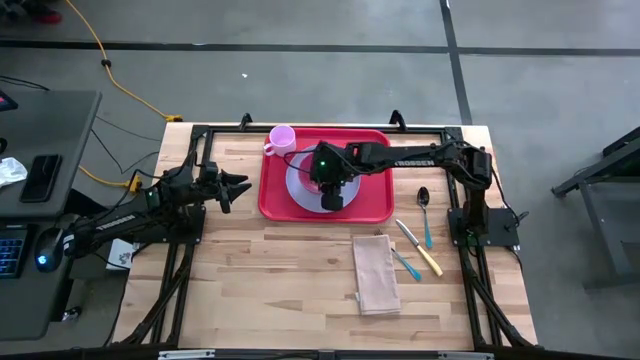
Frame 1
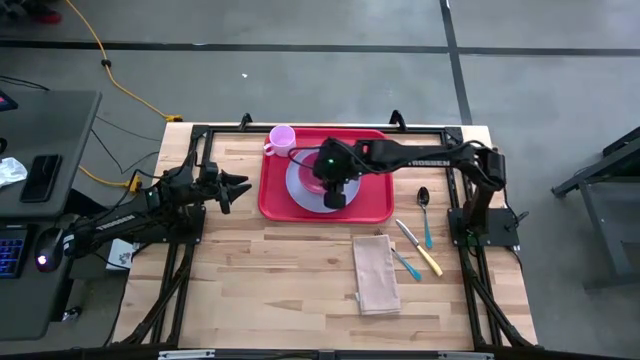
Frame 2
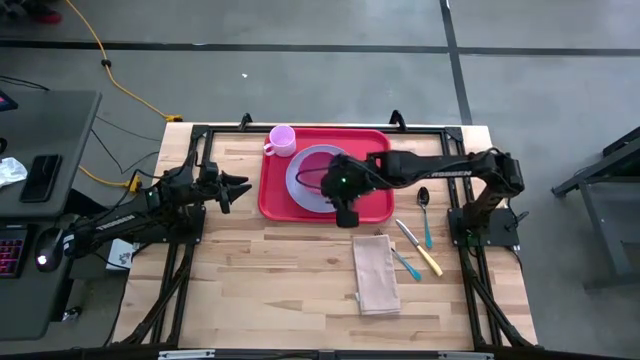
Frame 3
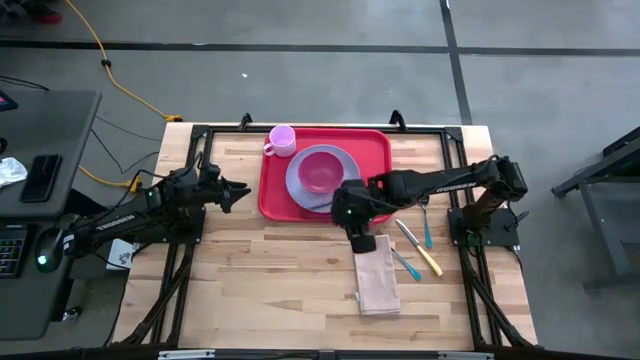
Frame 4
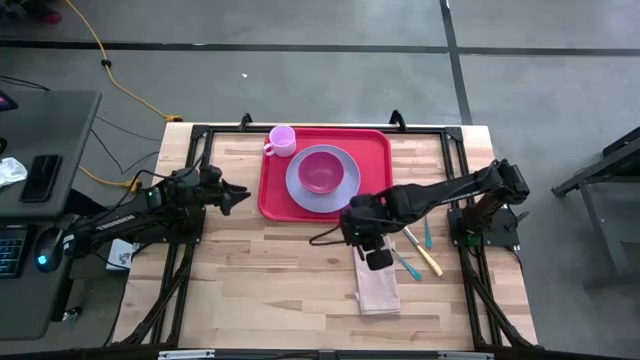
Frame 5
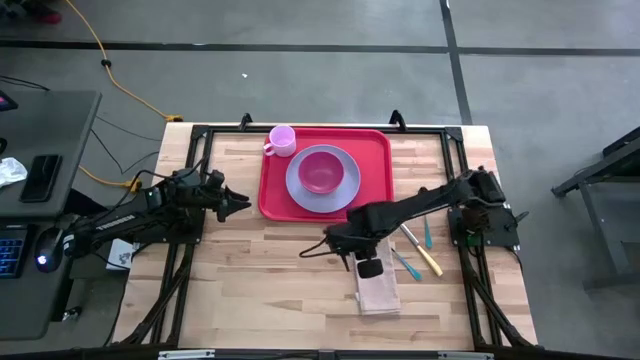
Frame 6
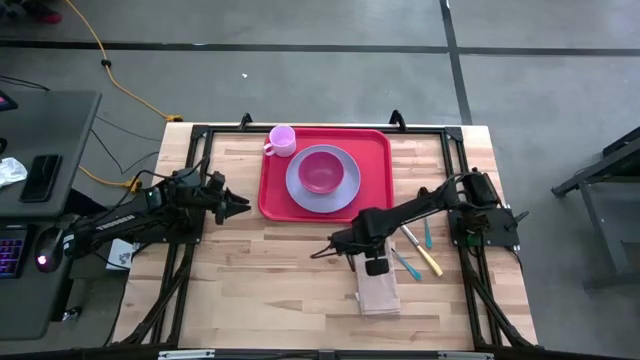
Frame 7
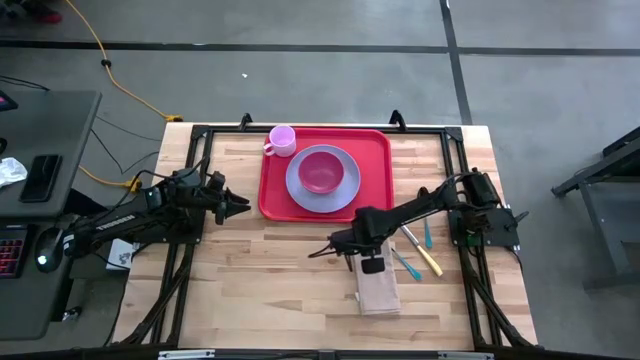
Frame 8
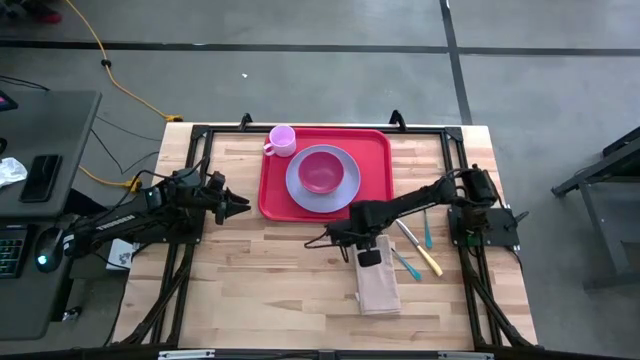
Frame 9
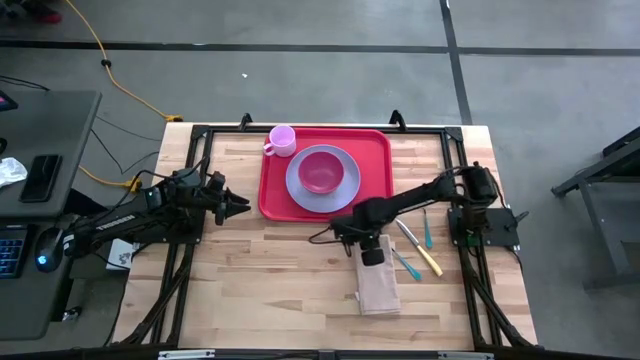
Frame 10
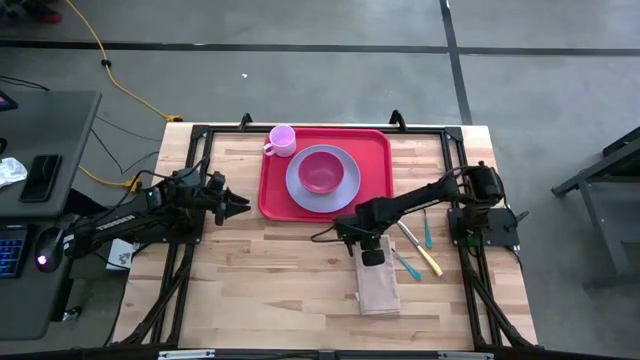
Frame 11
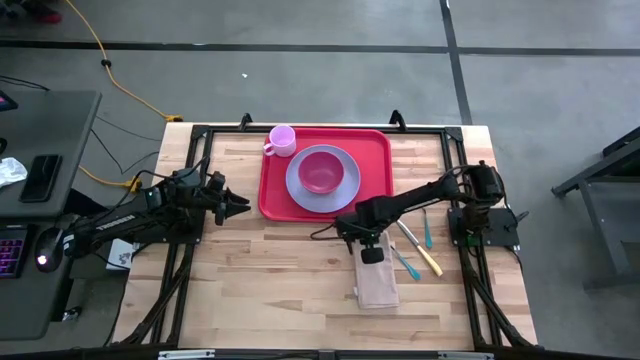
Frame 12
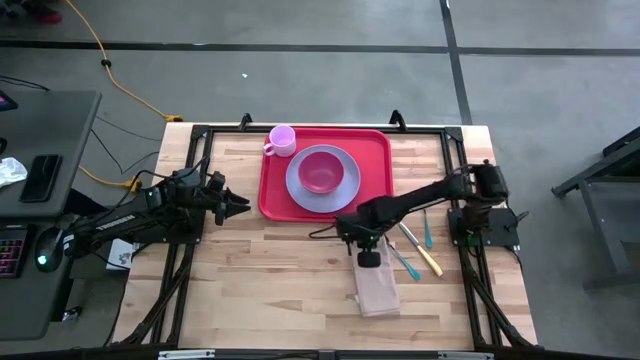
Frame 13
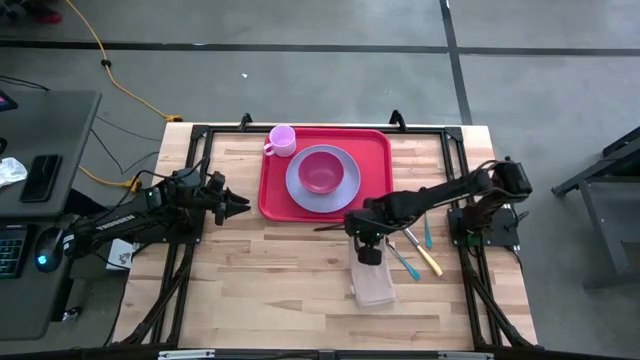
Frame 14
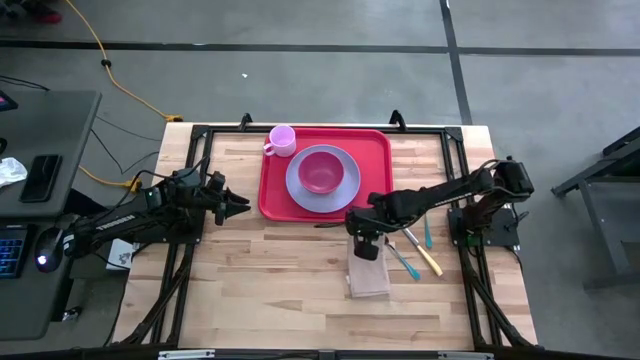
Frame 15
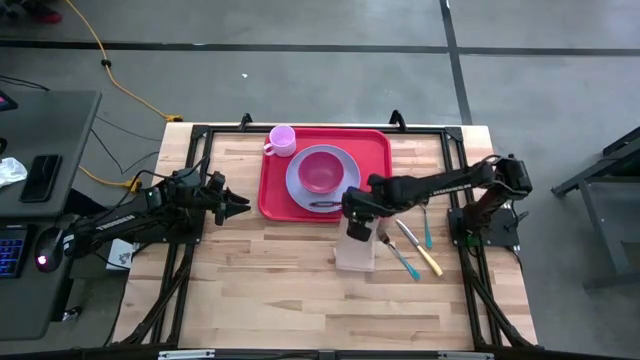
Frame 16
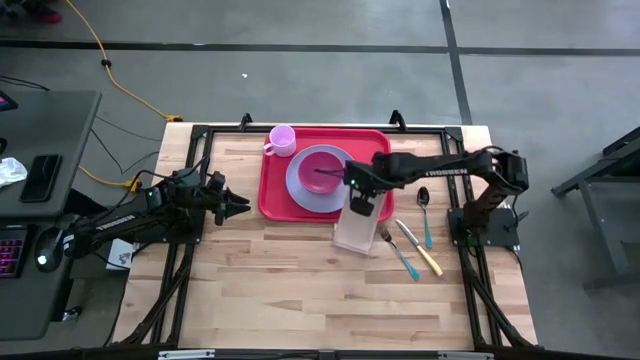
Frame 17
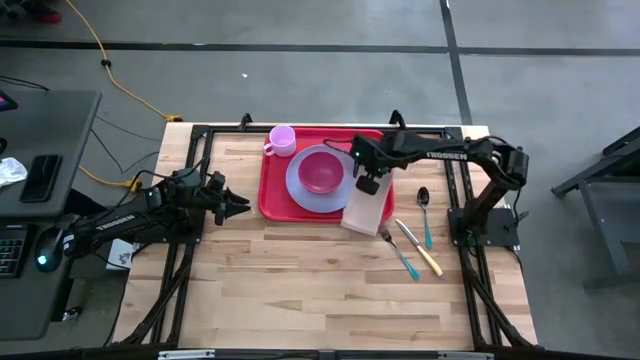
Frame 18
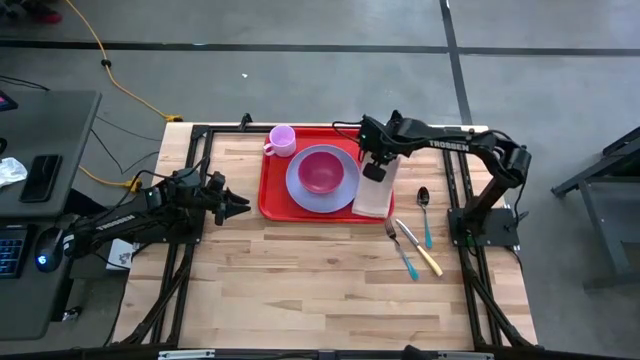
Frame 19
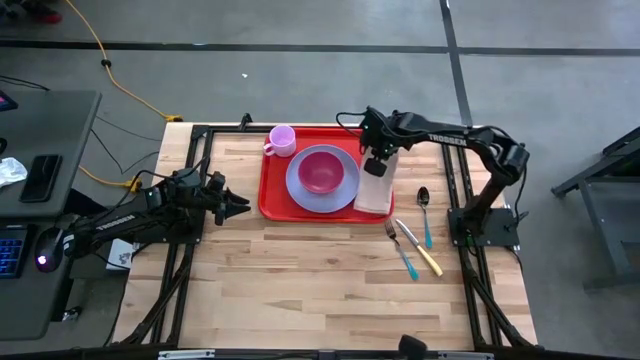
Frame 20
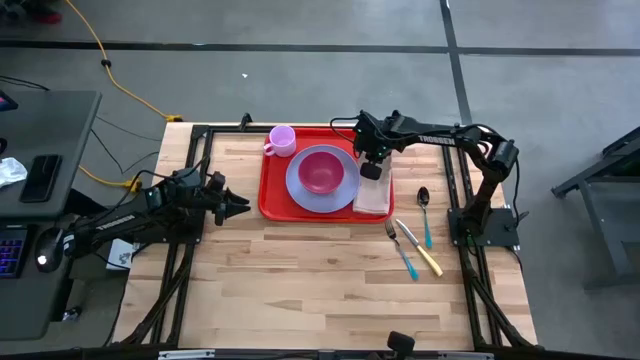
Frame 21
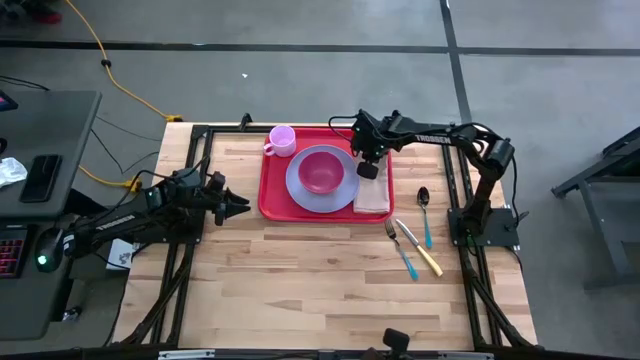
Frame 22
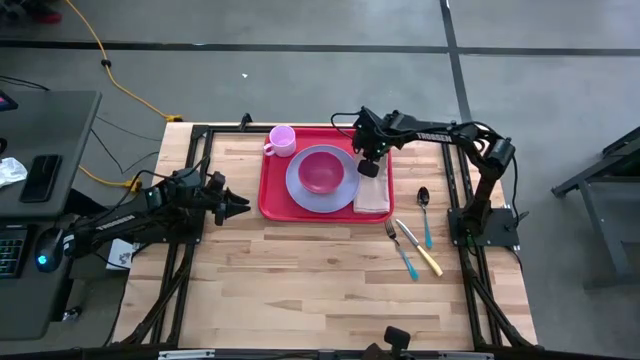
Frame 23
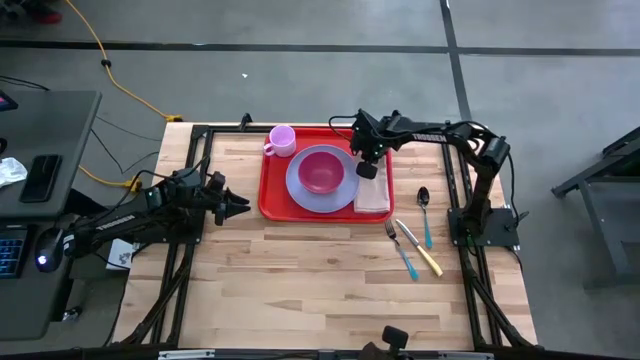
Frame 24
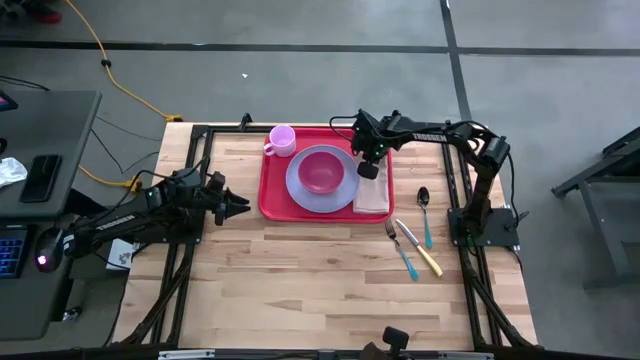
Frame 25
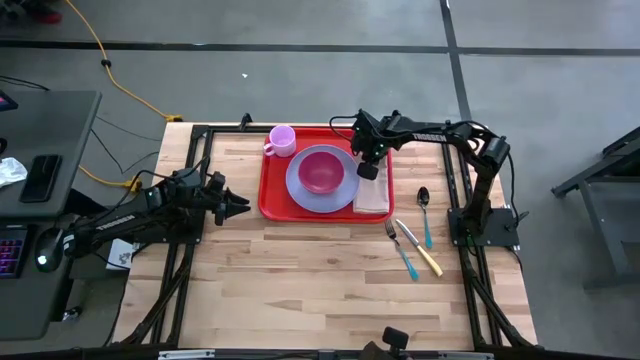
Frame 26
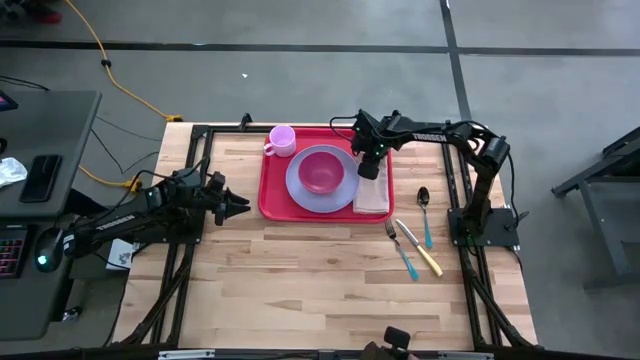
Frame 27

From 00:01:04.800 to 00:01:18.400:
Task: Set up tray
Put the napkin on the tray

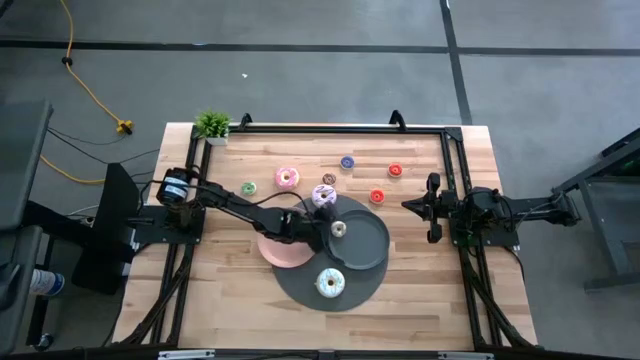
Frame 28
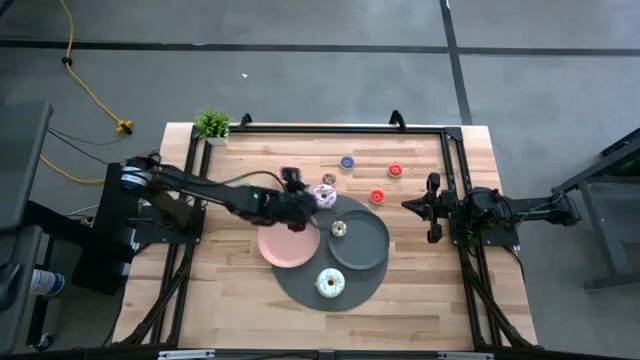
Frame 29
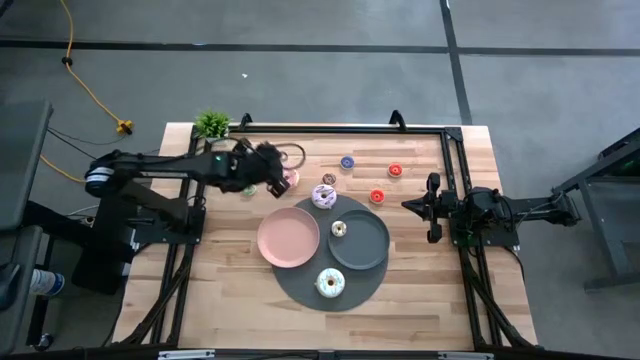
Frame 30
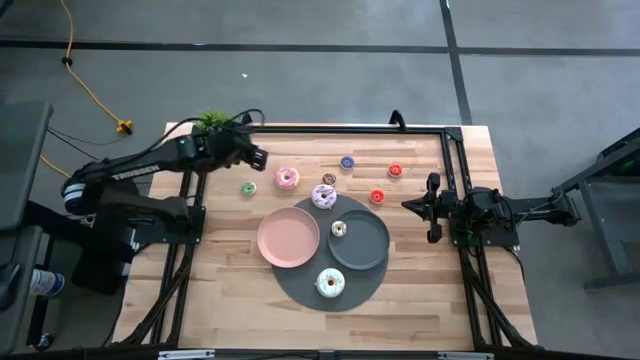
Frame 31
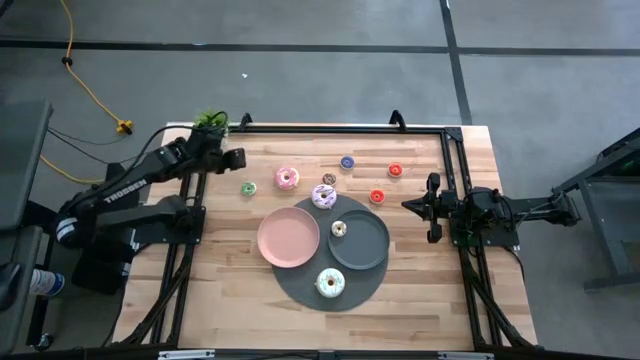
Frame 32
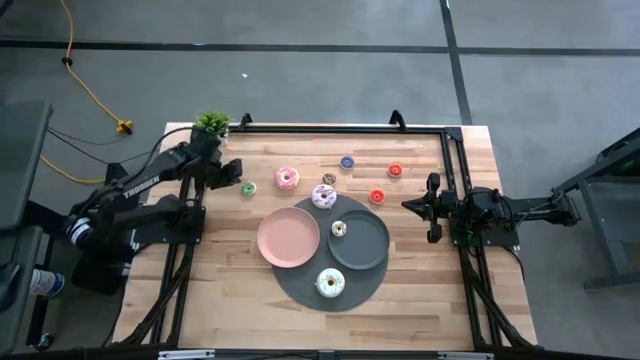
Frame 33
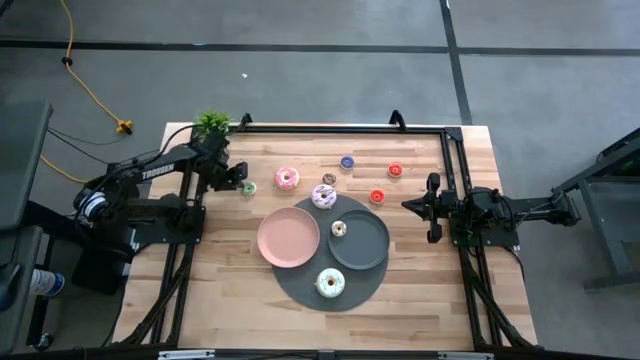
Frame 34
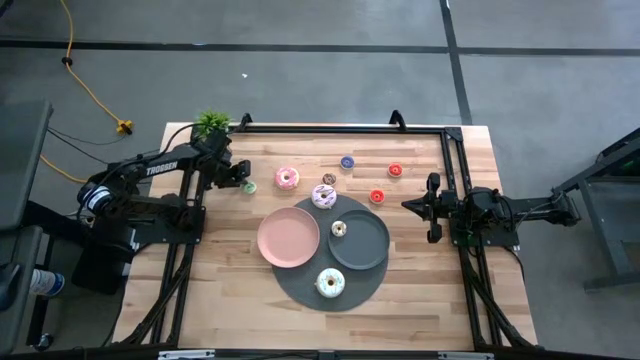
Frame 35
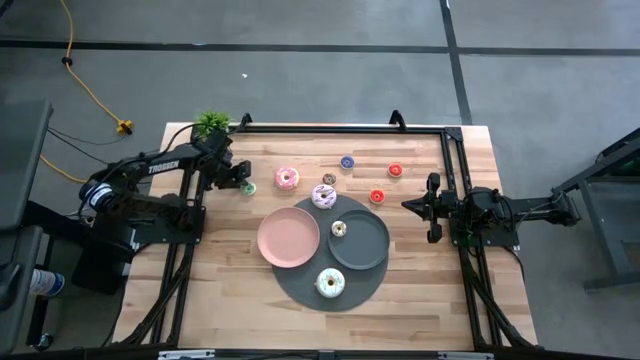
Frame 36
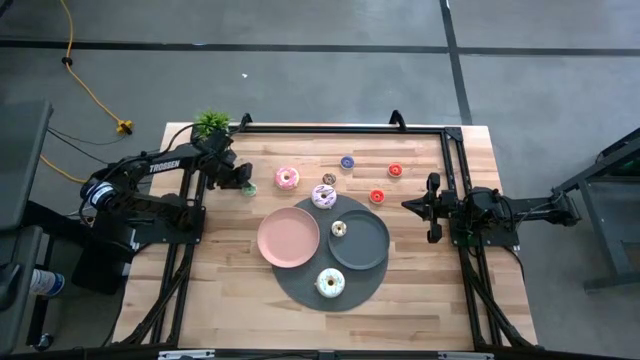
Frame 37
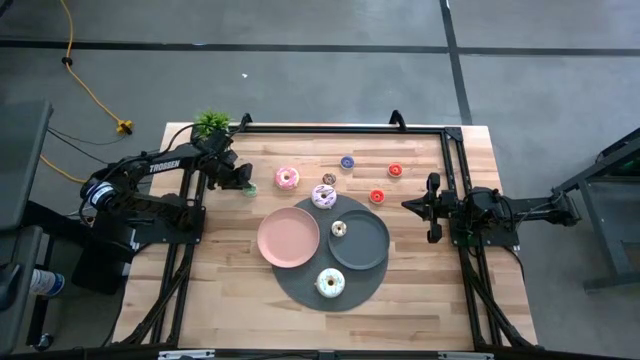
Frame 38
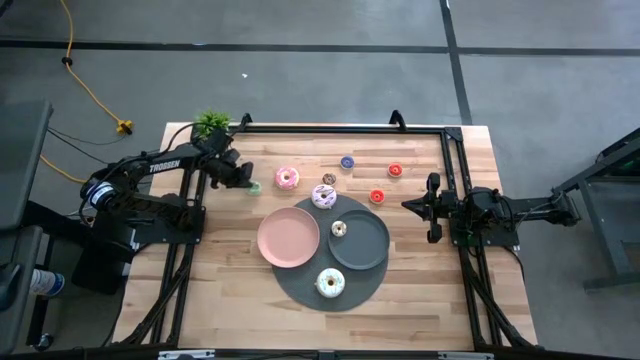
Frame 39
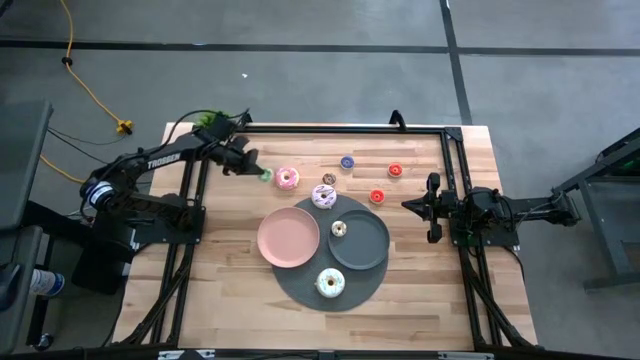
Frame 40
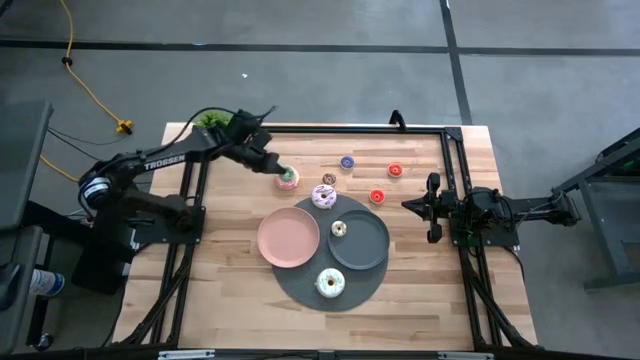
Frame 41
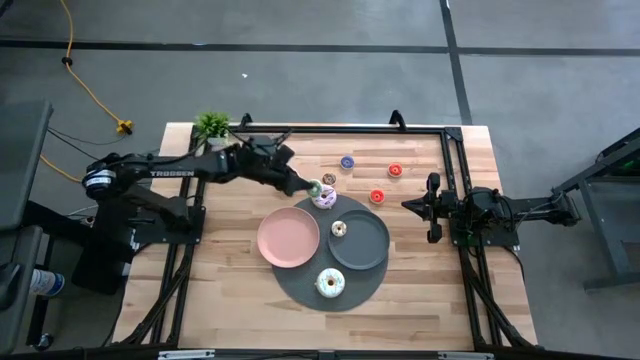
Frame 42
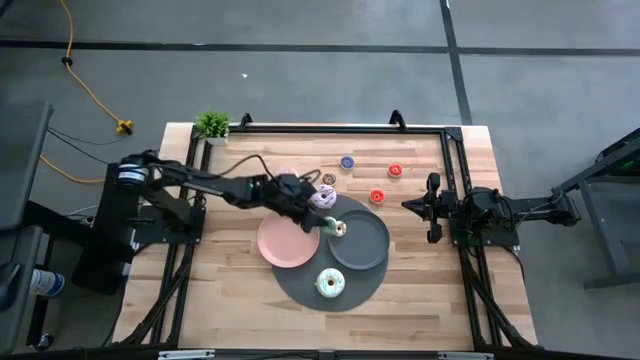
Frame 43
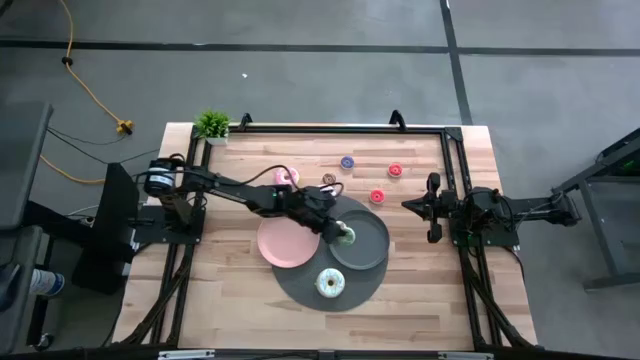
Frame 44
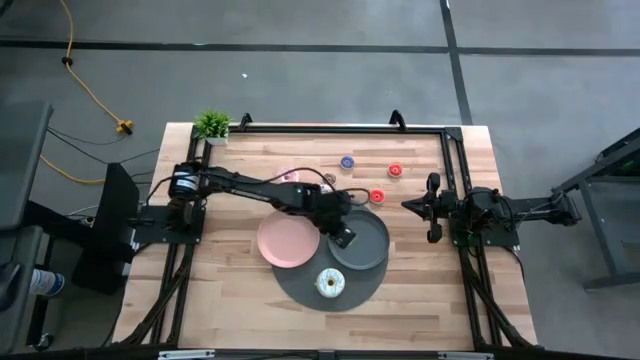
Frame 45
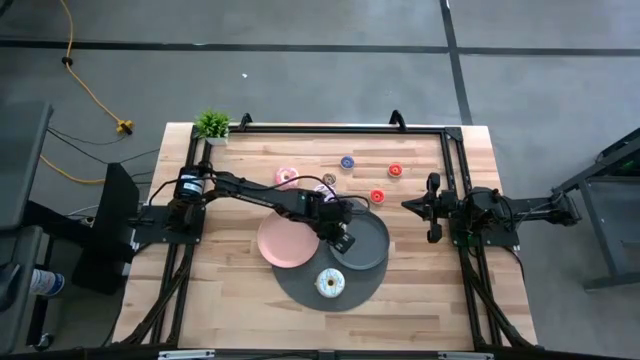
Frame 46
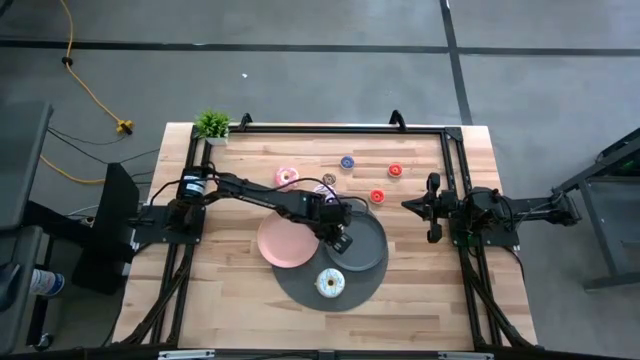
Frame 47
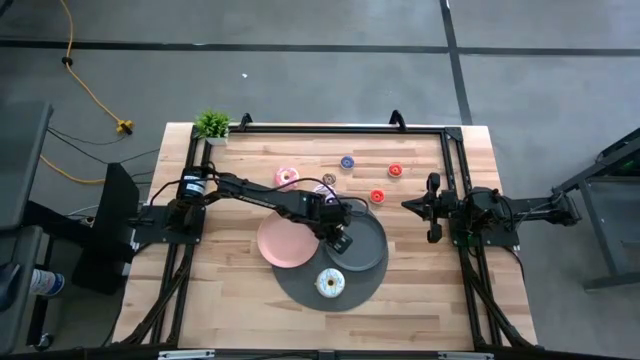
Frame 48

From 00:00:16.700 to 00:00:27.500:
Task: Pick & Place donuts
Put the small green donut on the black plate
